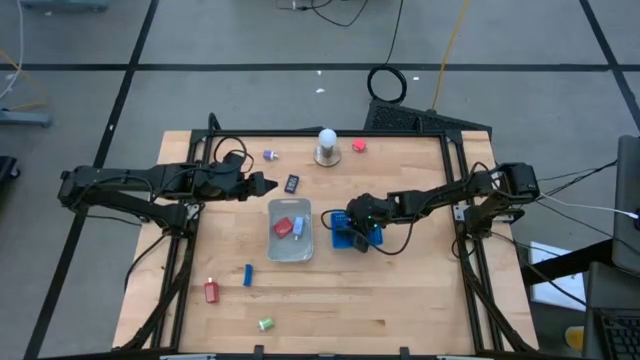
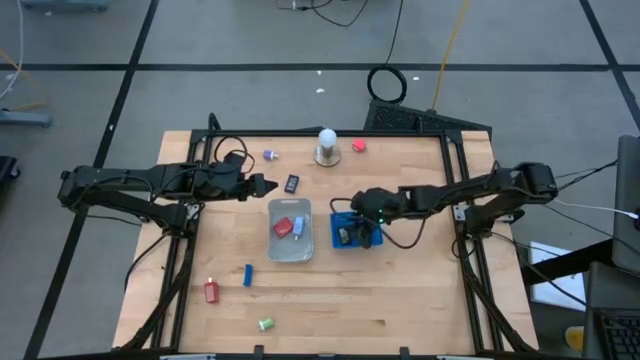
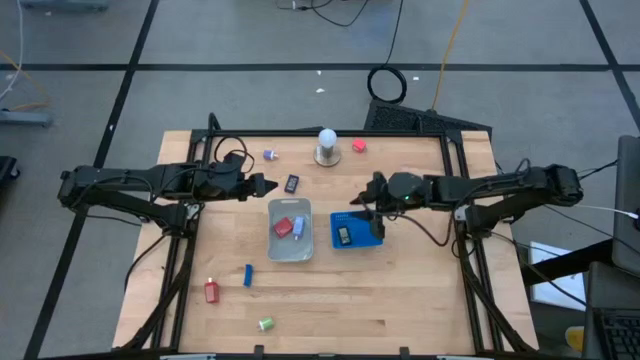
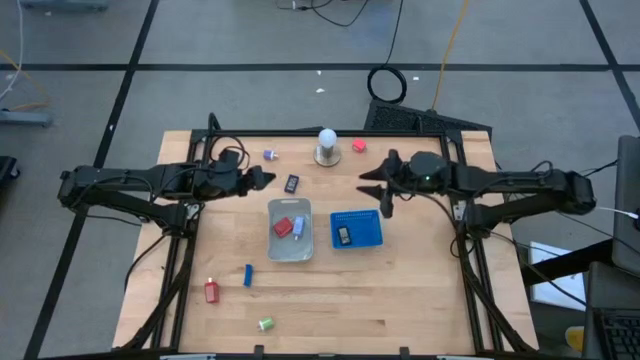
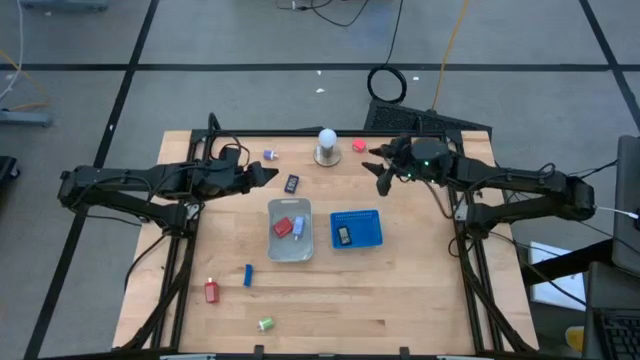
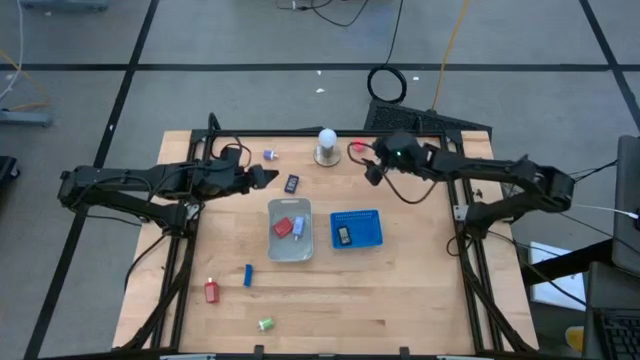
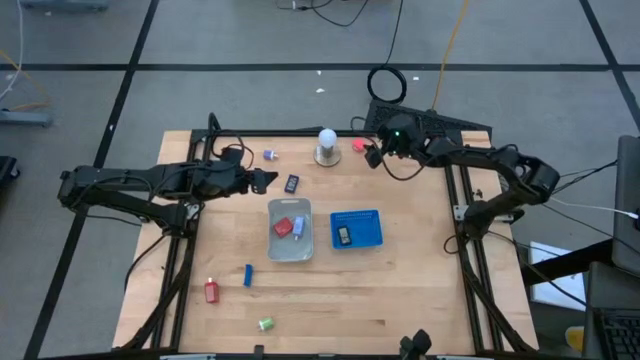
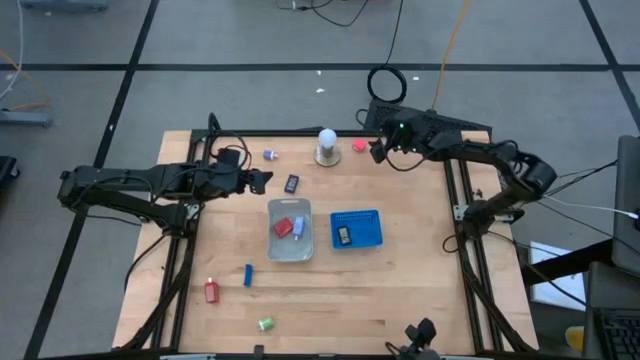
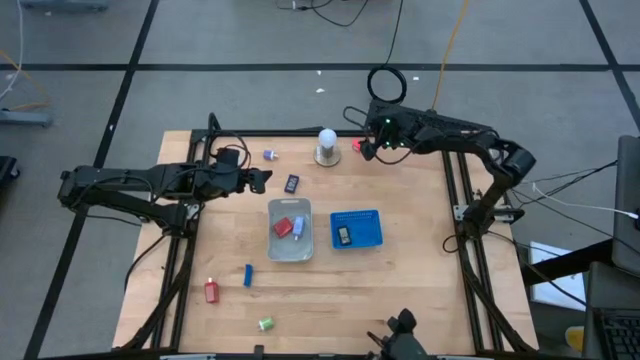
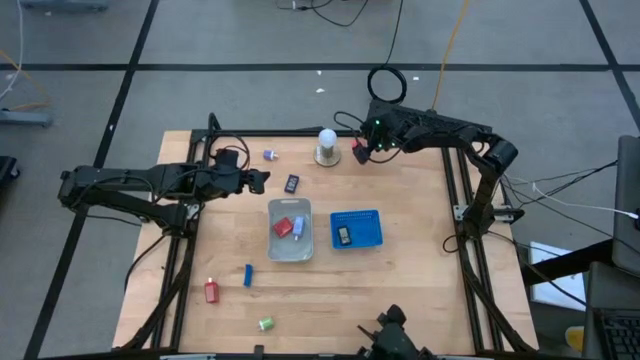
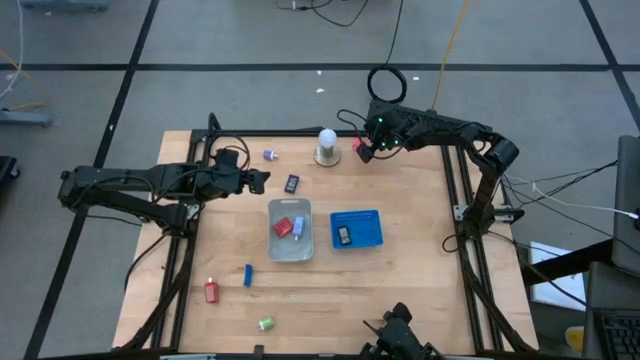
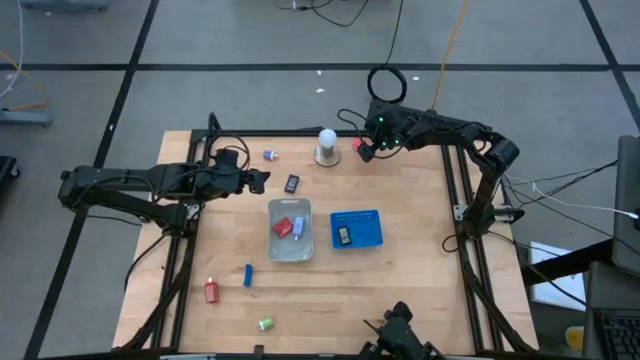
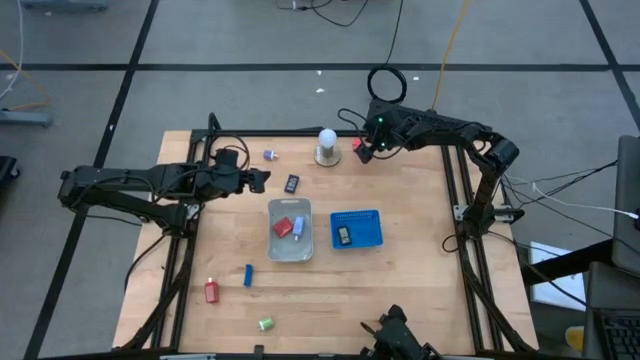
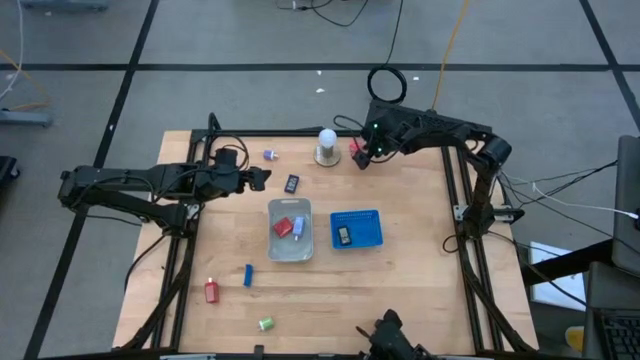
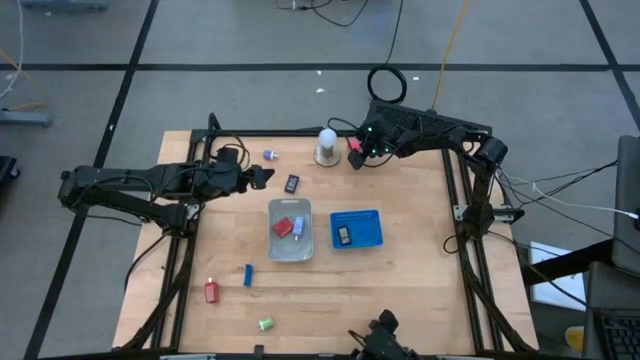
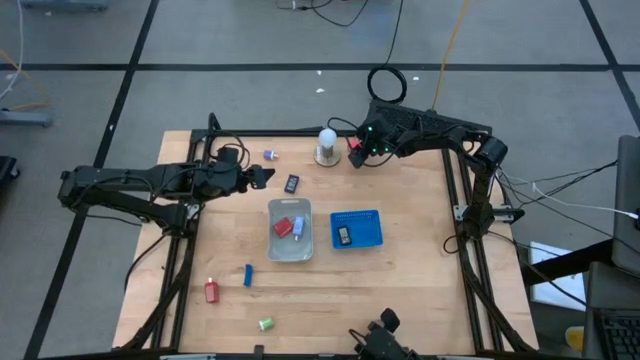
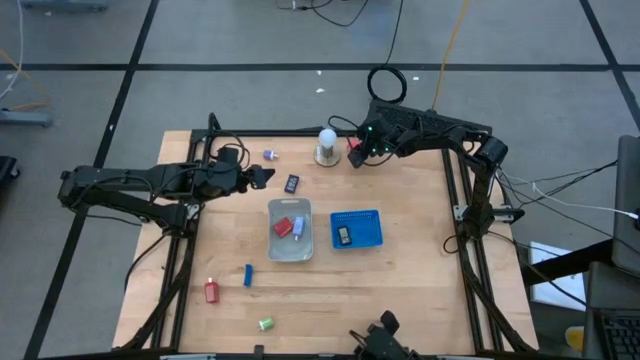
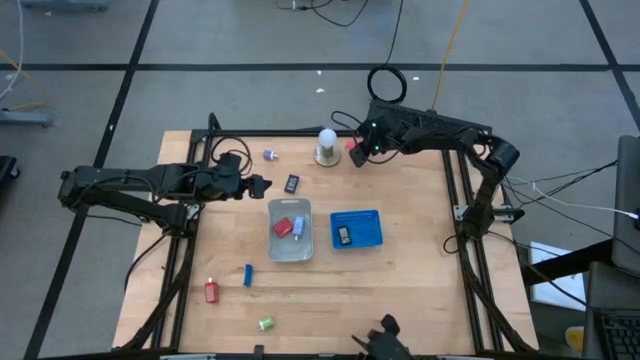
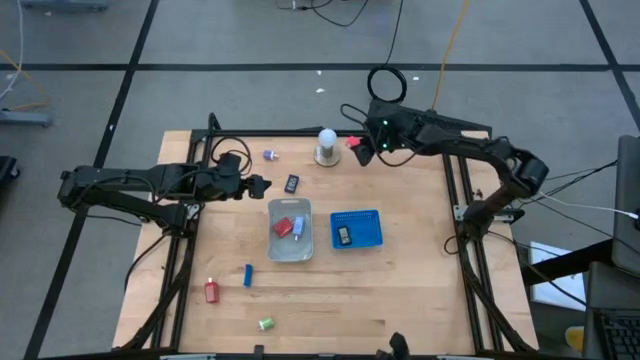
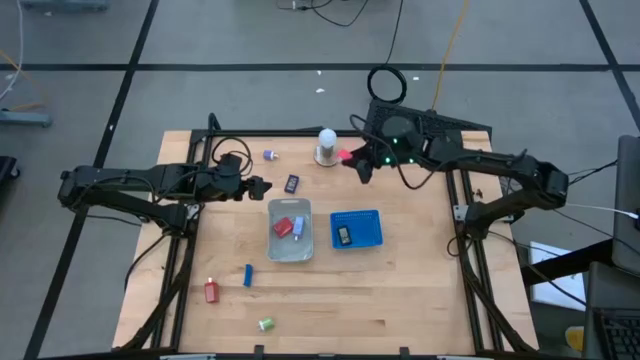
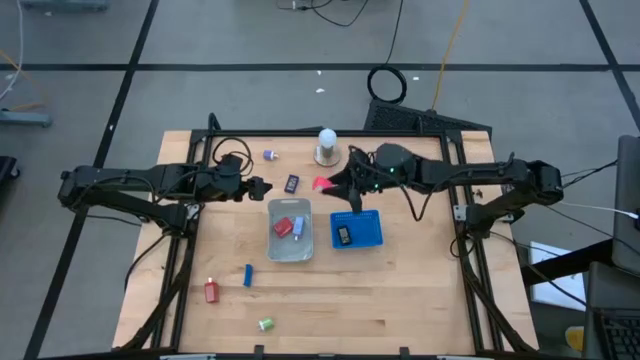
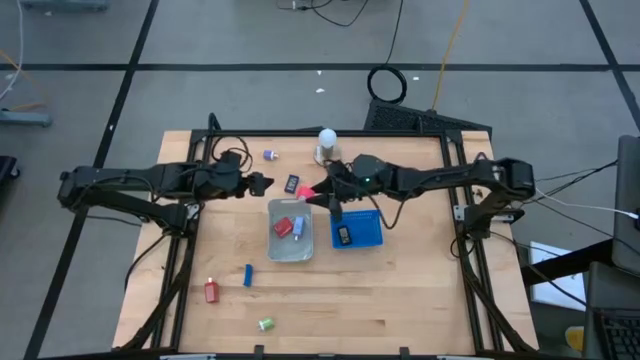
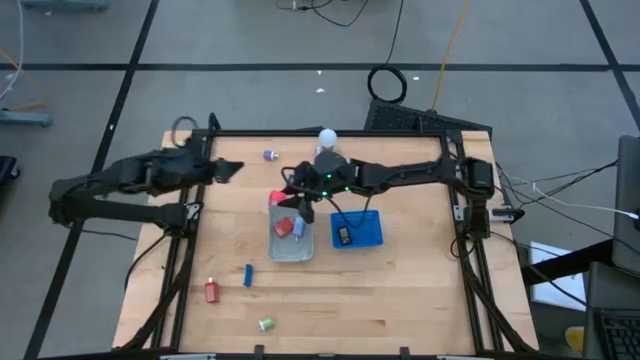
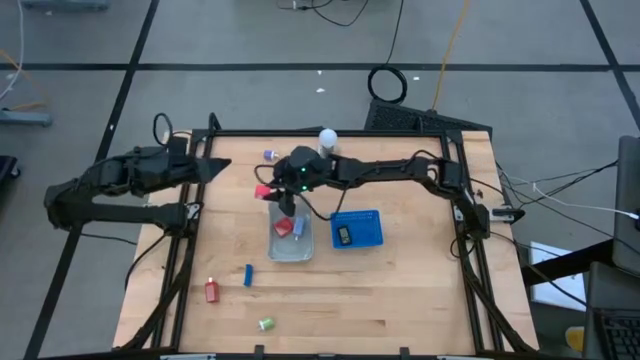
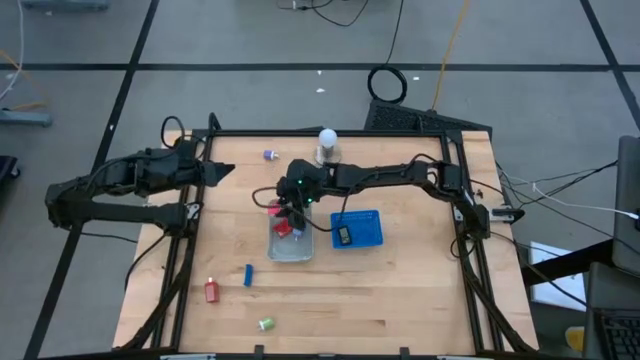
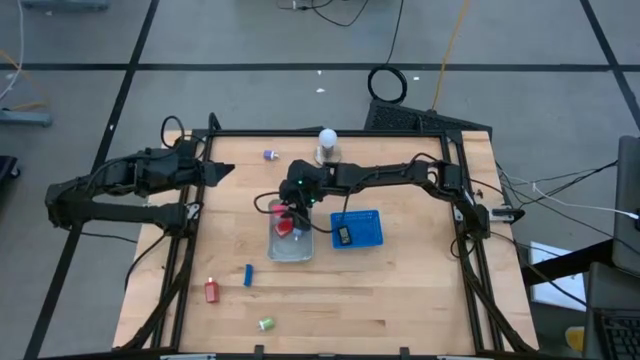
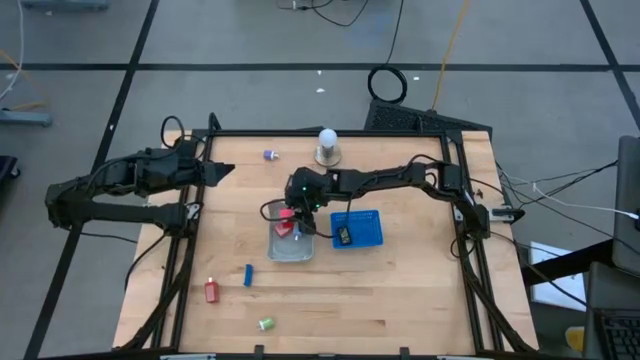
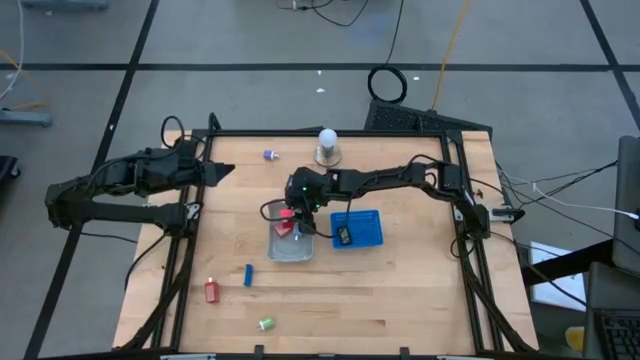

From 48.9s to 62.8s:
Task: Pick & Place Office items
Put the pink charger adapter into the gray bin

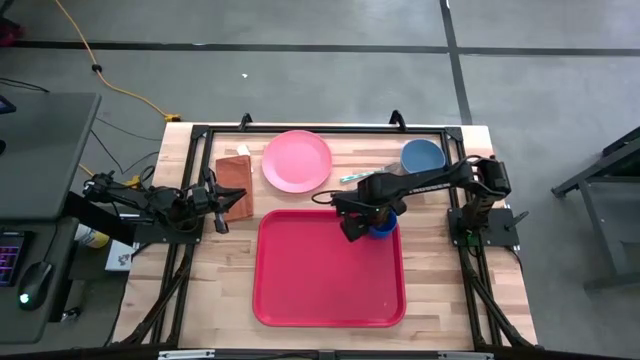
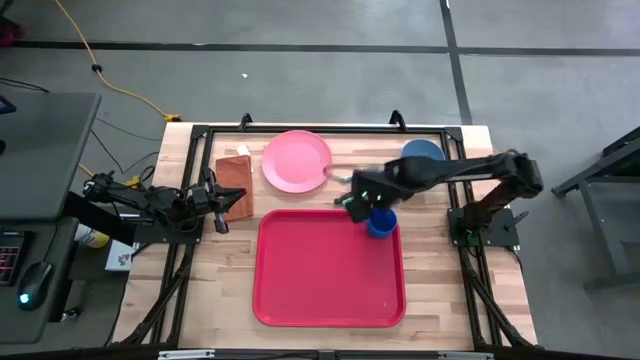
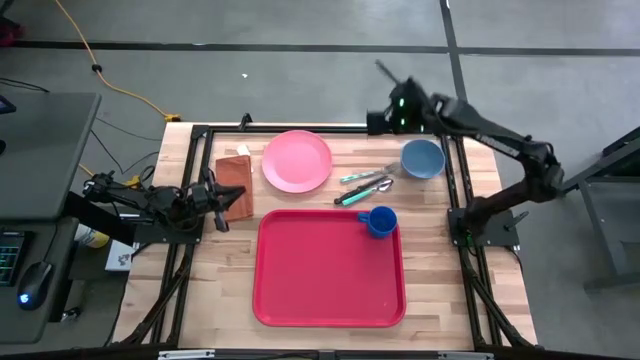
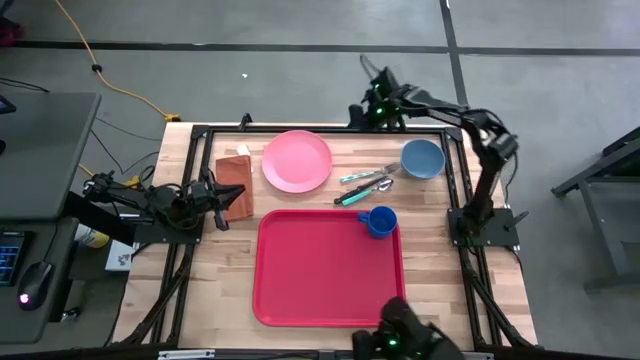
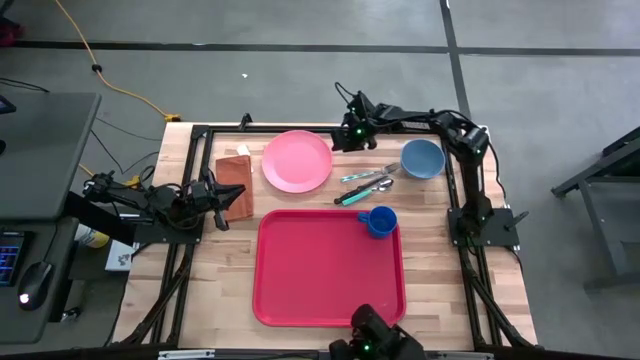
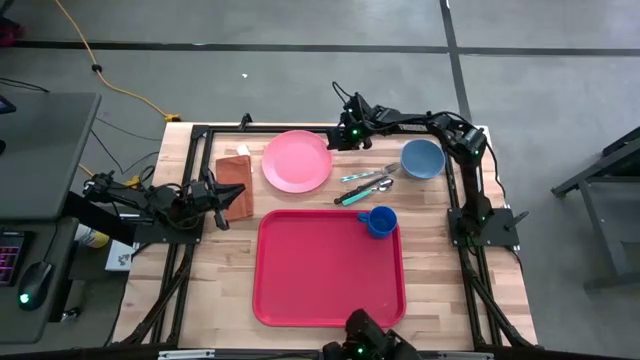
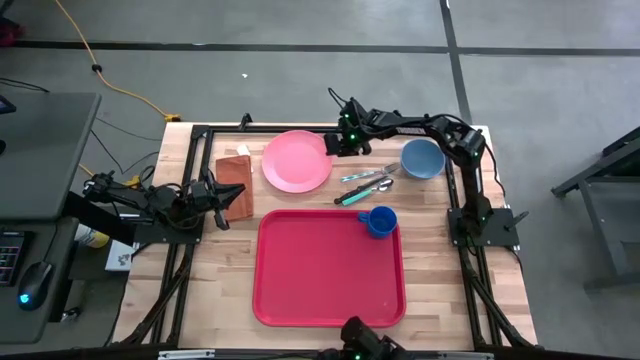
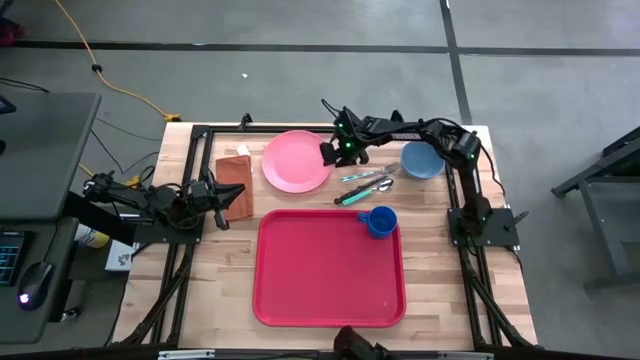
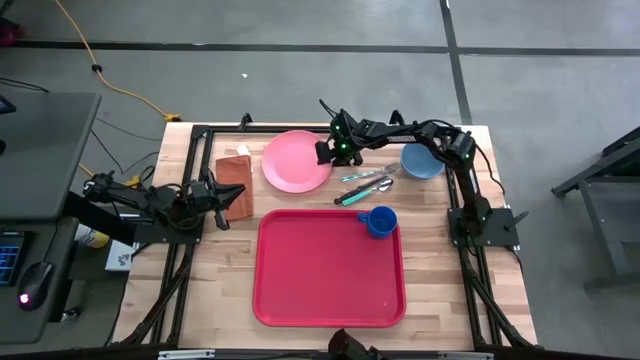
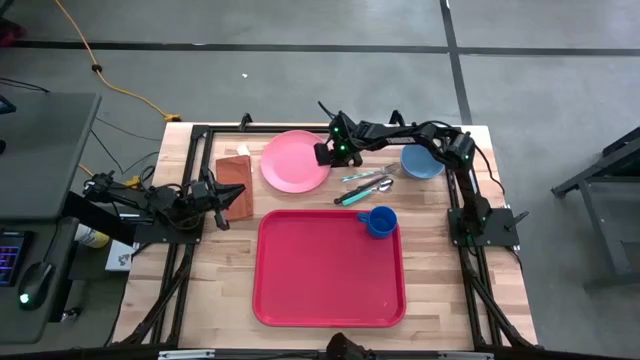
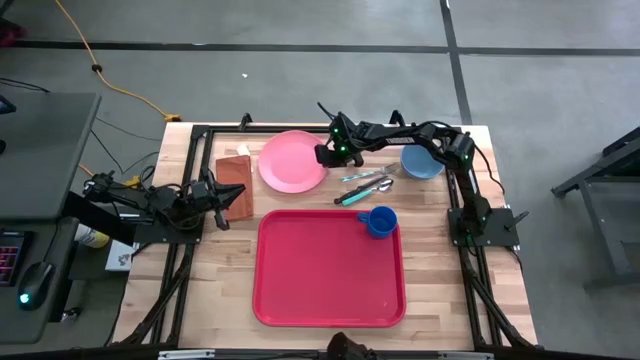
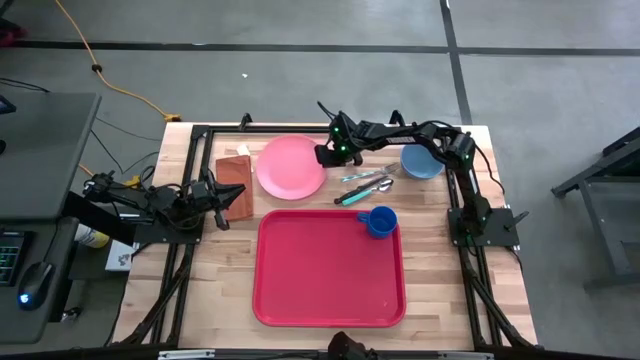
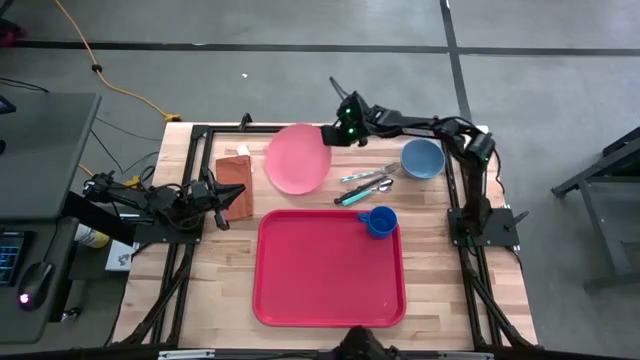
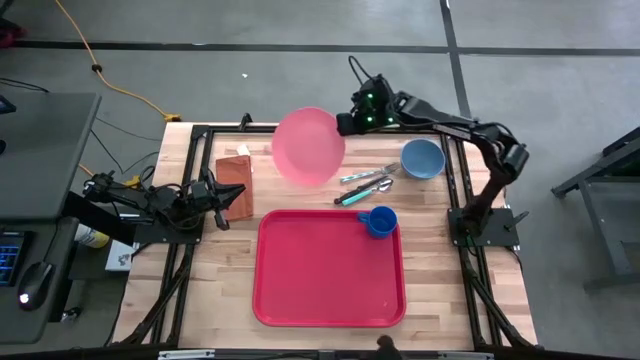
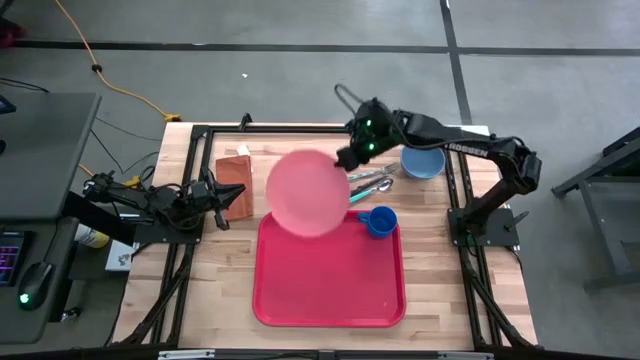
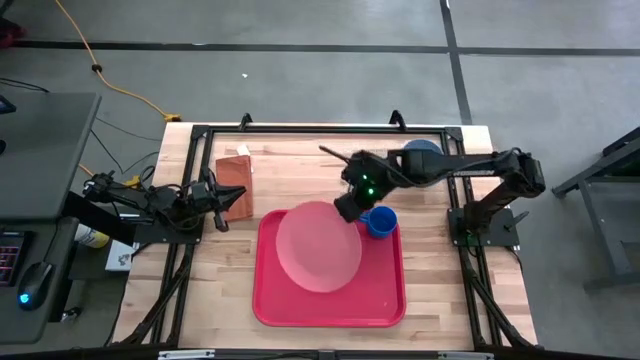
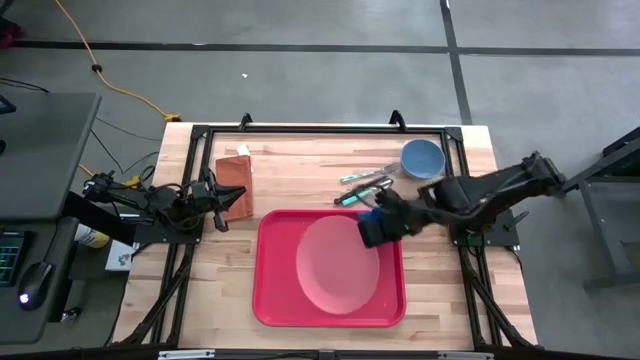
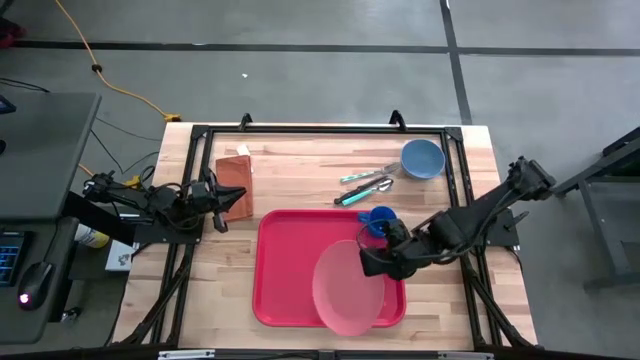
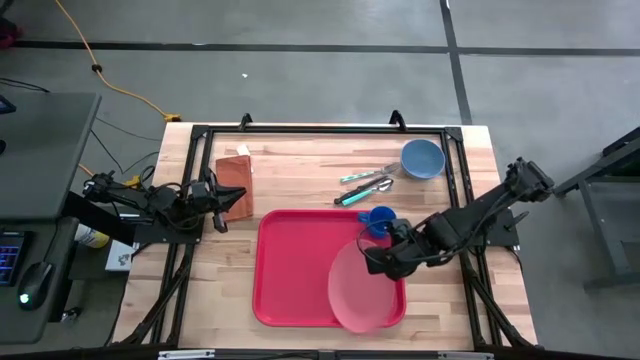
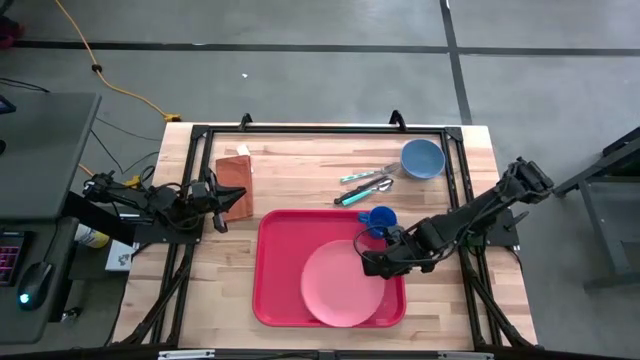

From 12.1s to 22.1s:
Task: Set up tray
Put the pink plate on the red serving tray
